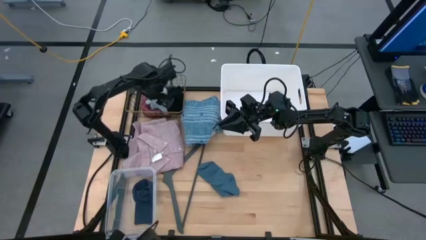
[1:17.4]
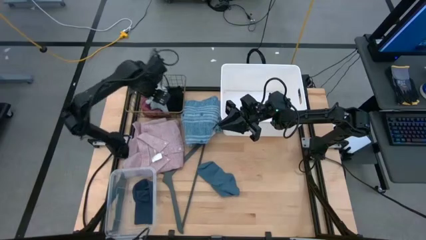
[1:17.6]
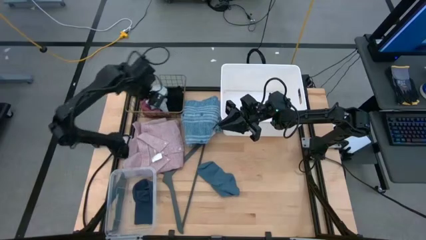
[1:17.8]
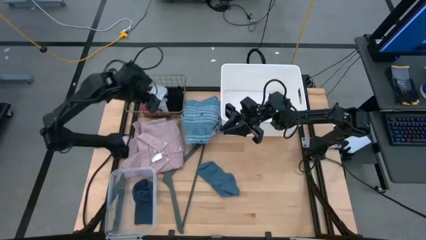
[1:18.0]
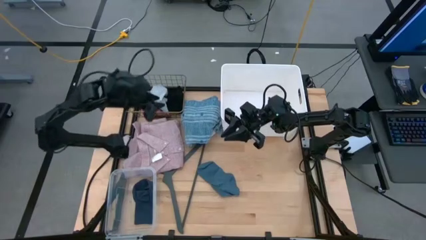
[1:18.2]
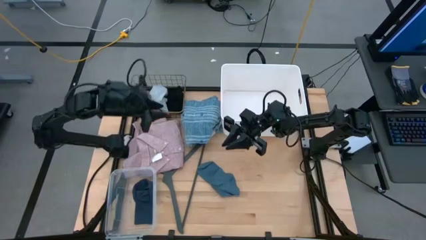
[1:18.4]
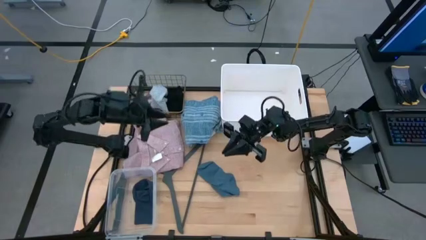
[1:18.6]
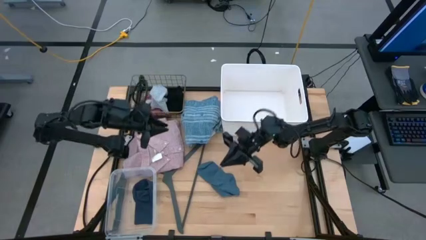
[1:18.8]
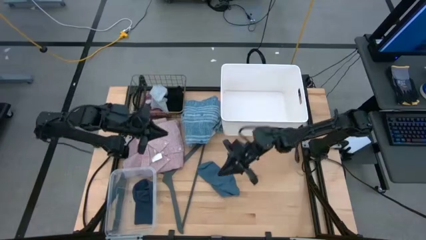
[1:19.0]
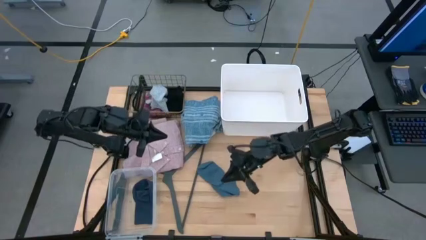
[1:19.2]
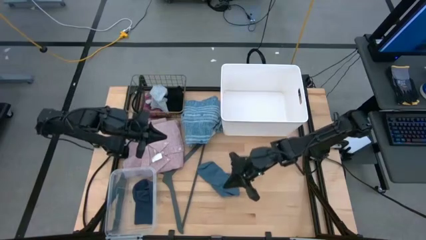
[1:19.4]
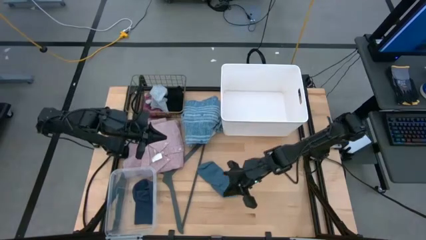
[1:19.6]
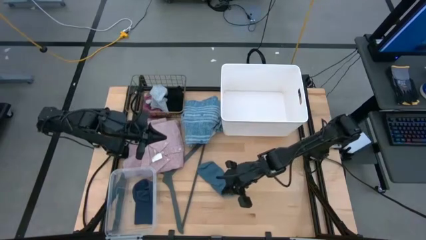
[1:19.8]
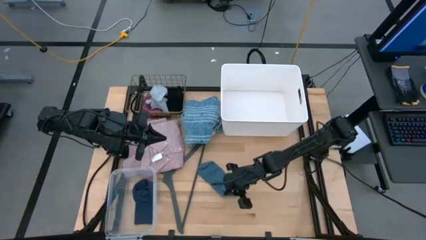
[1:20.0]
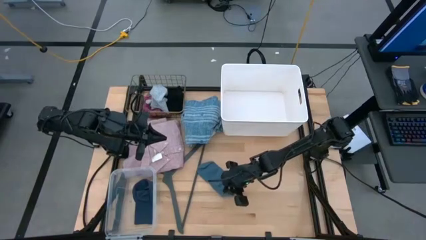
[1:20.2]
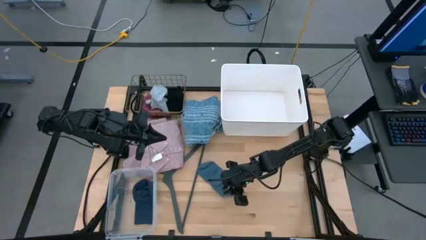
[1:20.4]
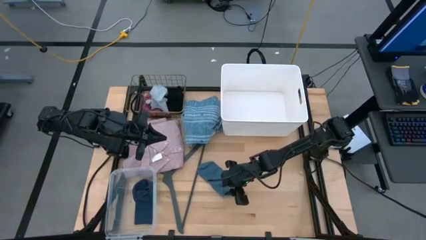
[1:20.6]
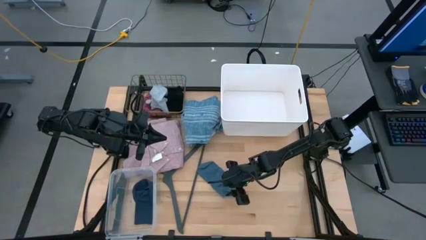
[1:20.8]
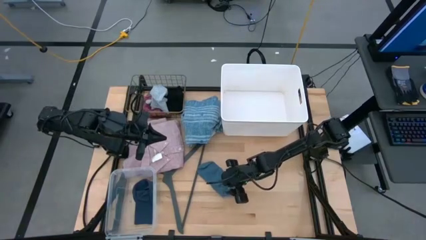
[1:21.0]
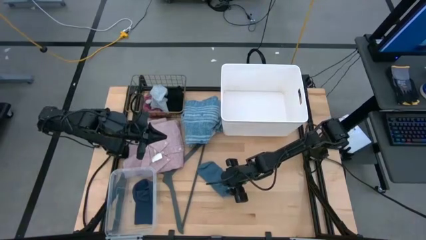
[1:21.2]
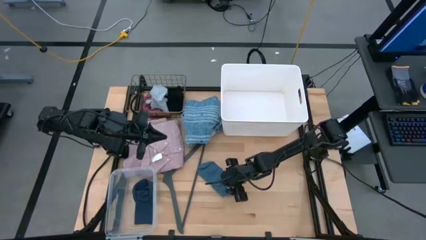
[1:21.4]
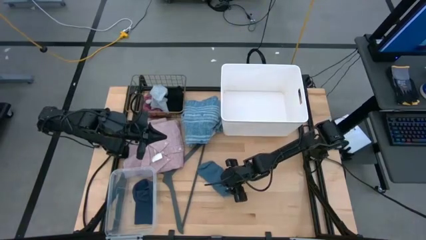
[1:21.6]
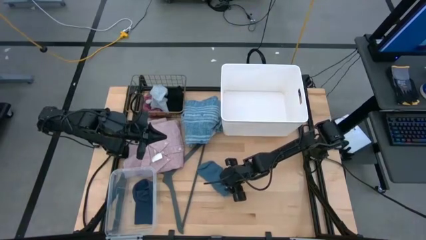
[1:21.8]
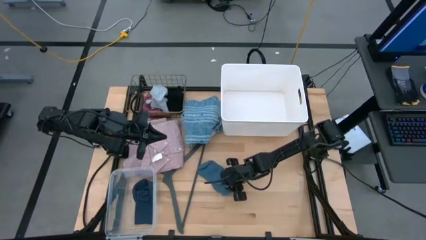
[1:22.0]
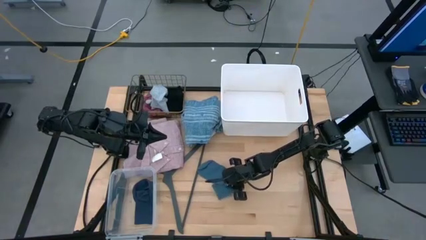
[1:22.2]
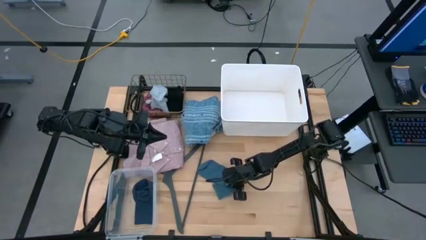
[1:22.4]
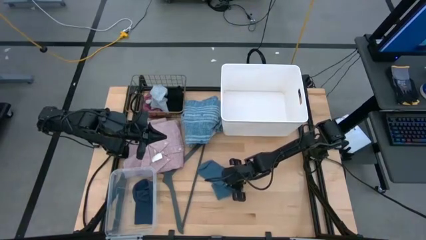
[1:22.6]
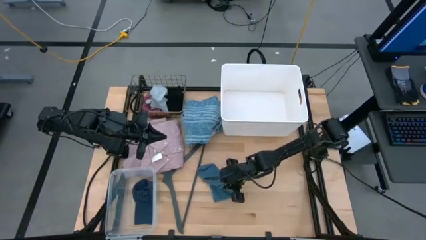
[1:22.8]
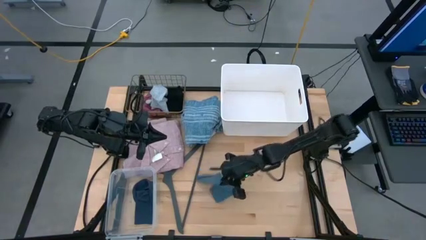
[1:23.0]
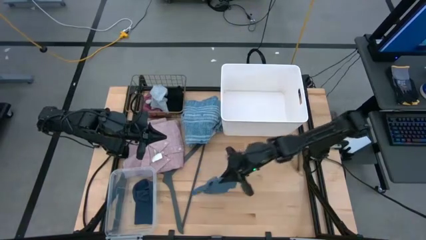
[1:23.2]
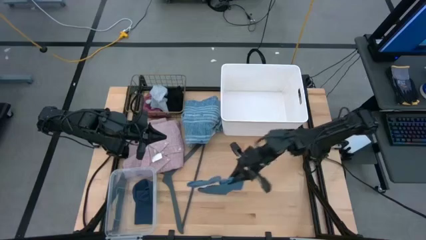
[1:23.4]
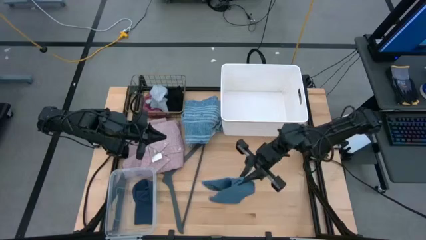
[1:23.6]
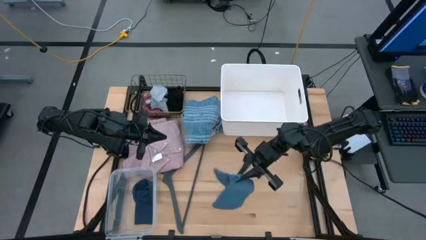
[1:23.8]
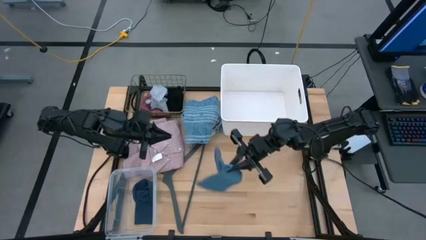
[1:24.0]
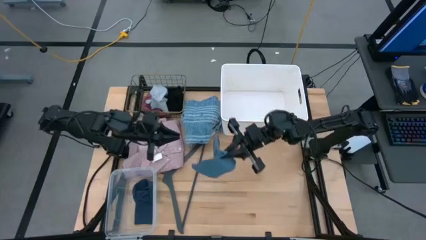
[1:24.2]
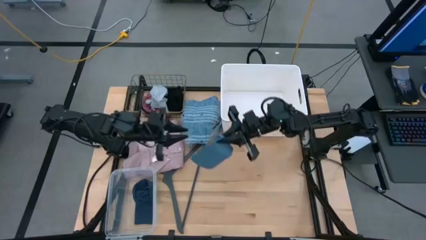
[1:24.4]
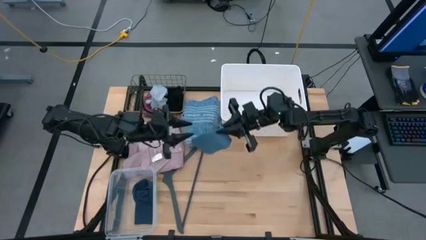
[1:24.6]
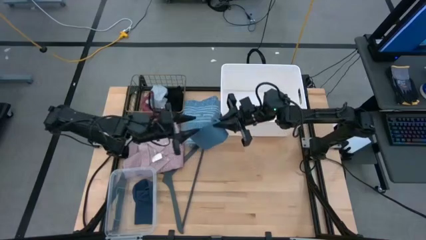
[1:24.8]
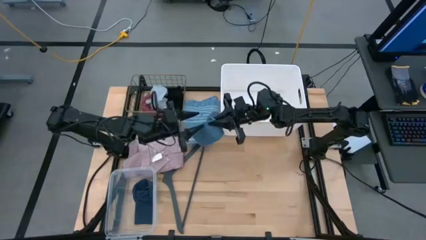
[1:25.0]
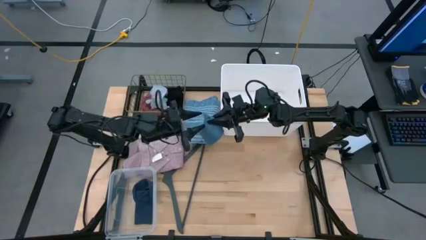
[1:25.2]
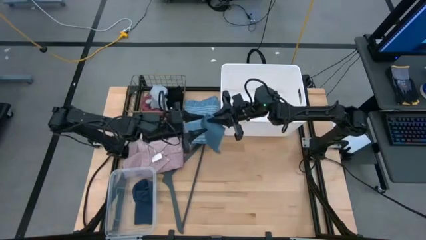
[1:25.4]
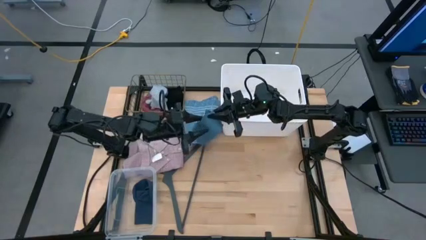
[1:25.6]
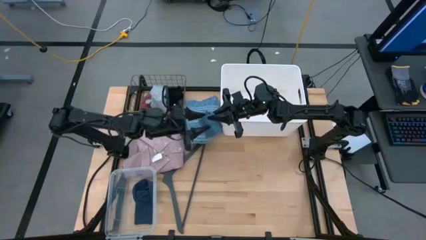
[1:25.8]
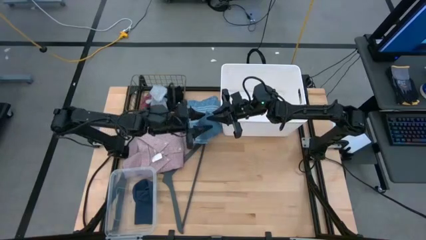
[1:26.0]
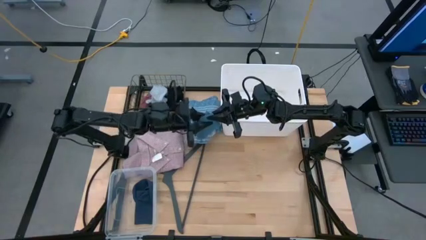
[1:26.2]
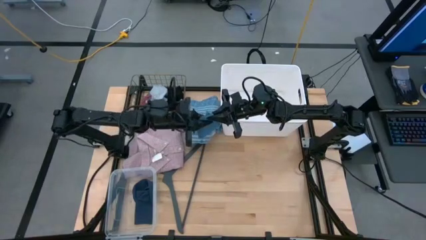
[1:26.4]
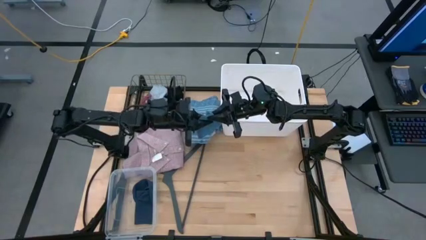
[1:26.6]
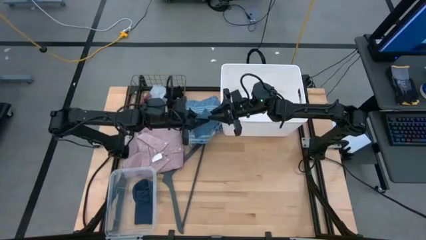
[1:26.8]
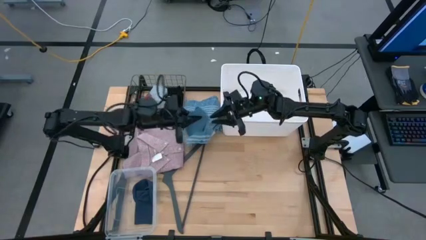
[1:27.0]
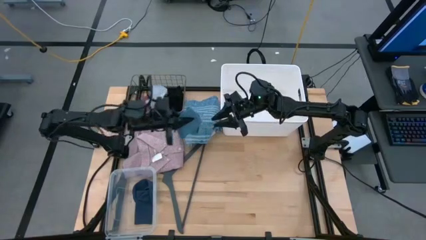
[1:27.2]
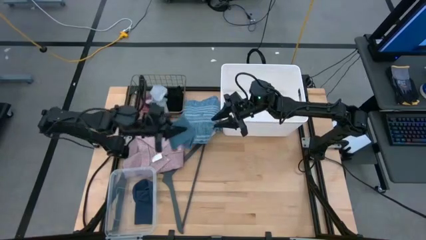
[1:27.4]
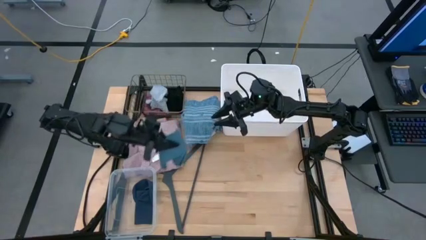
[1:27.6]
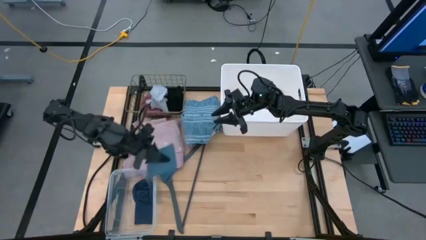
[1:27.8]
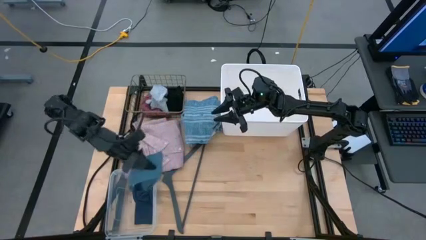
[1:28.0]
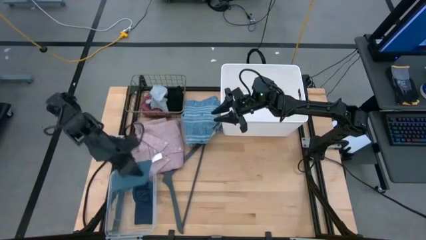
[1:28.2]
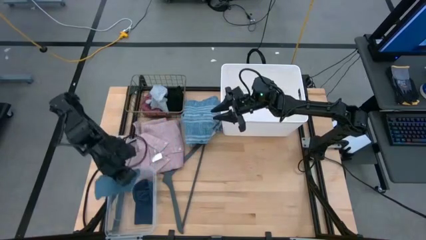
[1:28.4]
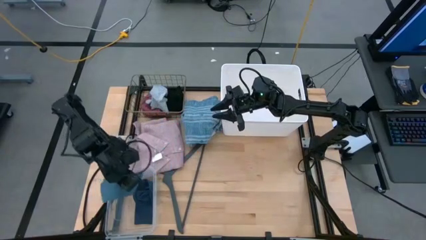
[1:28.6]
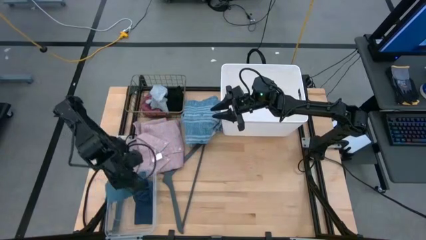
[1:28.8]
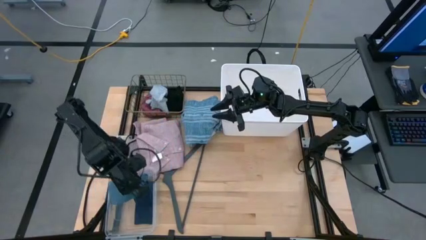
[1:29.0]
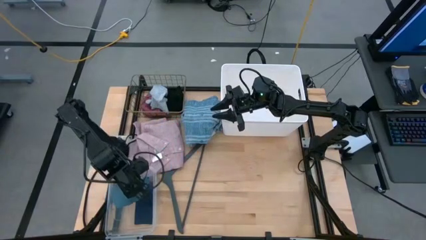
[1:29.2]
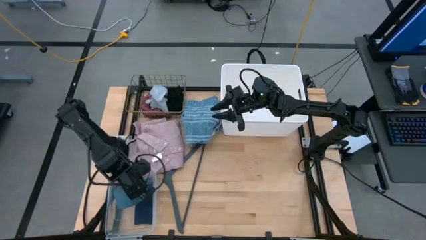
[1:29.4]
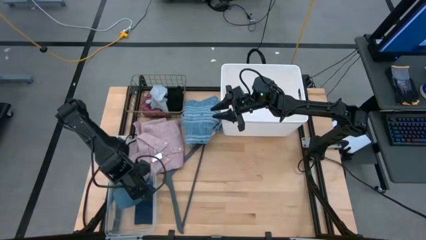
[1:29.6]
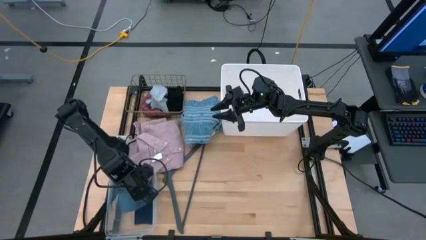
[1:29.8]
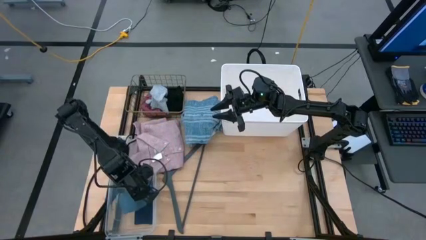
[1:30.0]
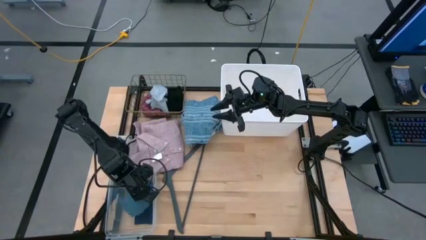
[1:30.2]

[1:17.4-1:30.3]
Task: Pick & Place Cloths
Put the blue sock into the transparent bin
